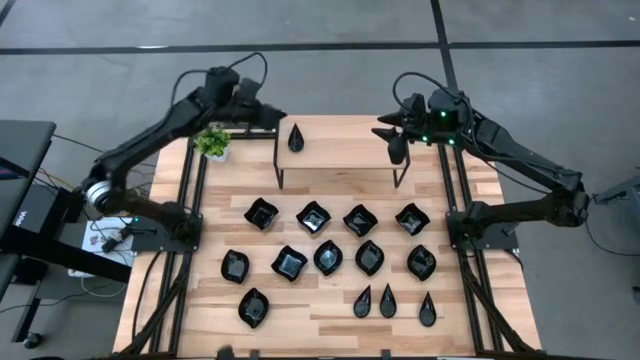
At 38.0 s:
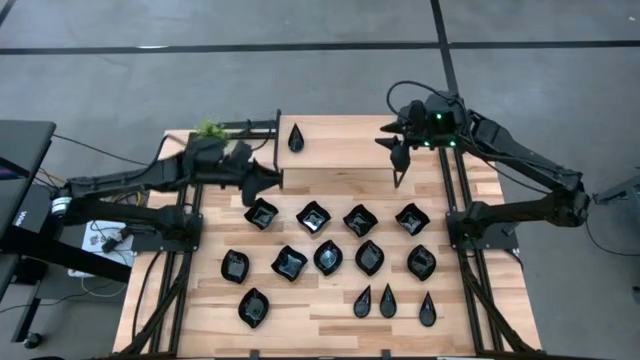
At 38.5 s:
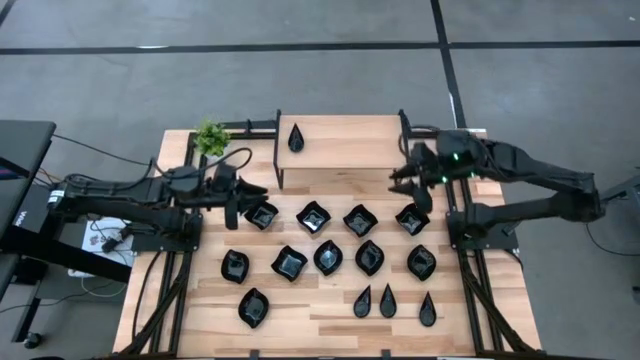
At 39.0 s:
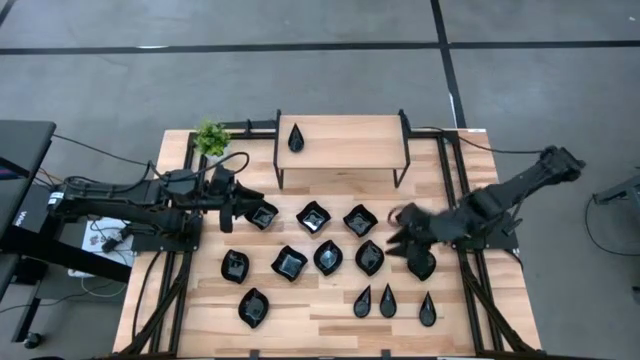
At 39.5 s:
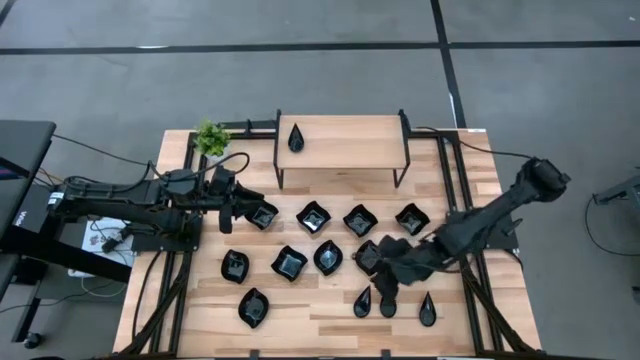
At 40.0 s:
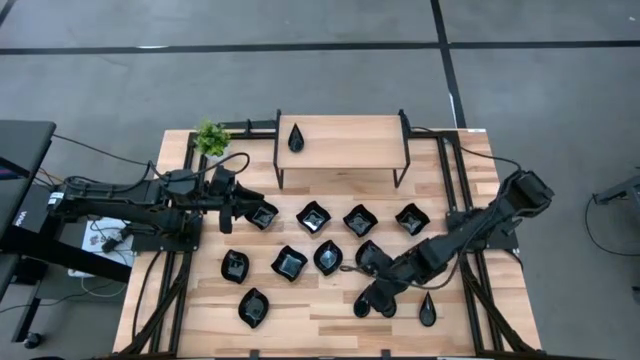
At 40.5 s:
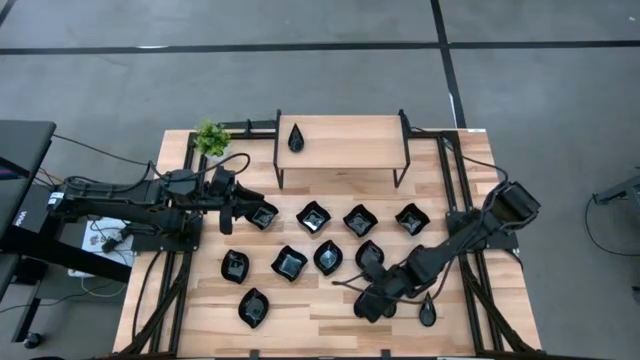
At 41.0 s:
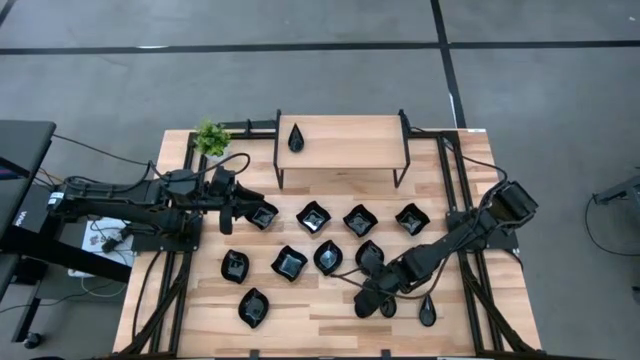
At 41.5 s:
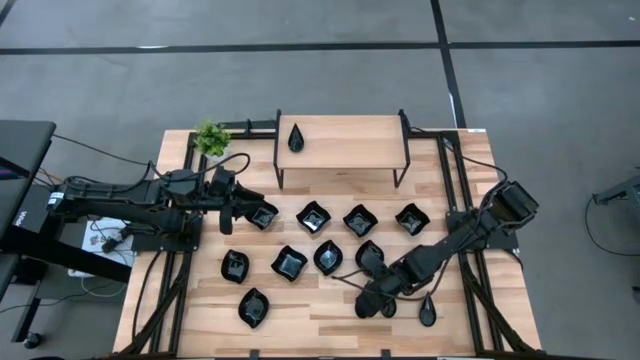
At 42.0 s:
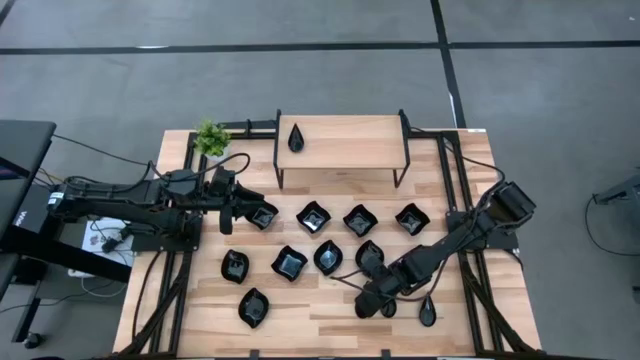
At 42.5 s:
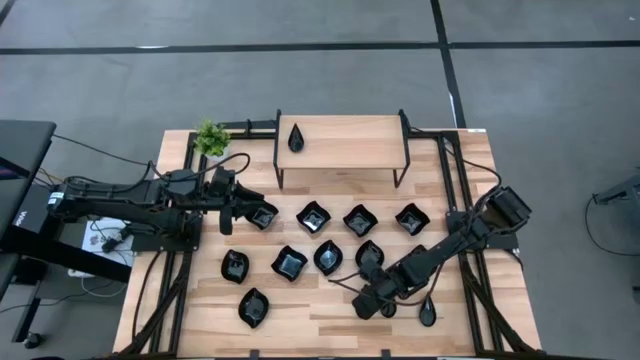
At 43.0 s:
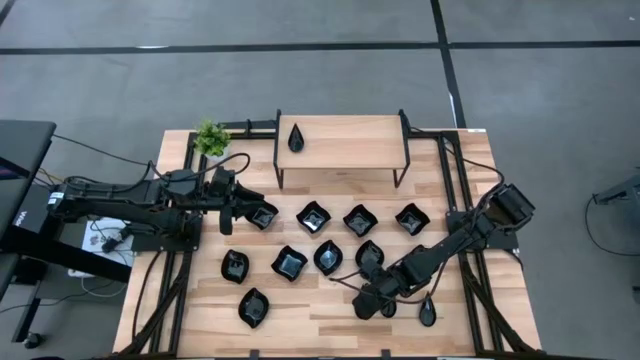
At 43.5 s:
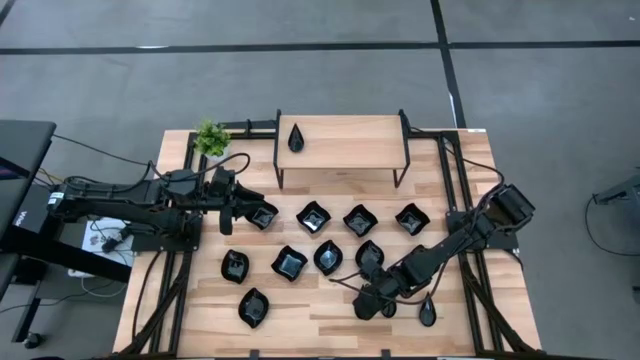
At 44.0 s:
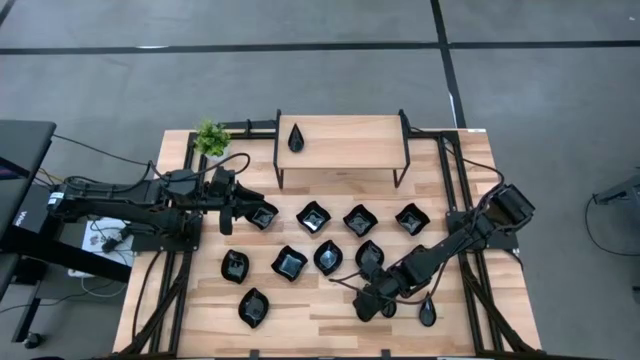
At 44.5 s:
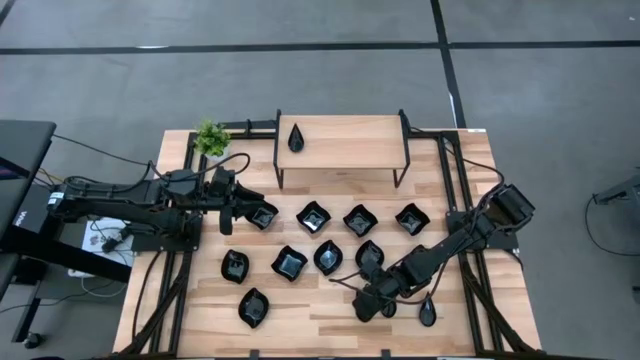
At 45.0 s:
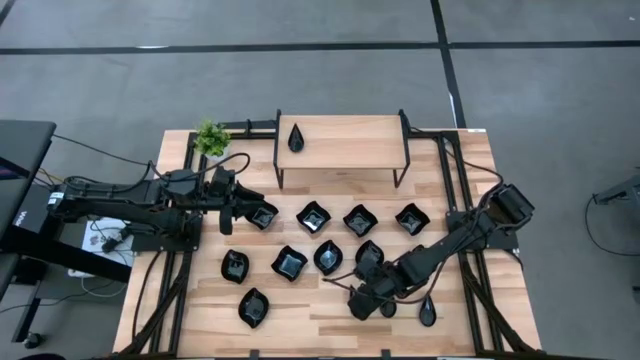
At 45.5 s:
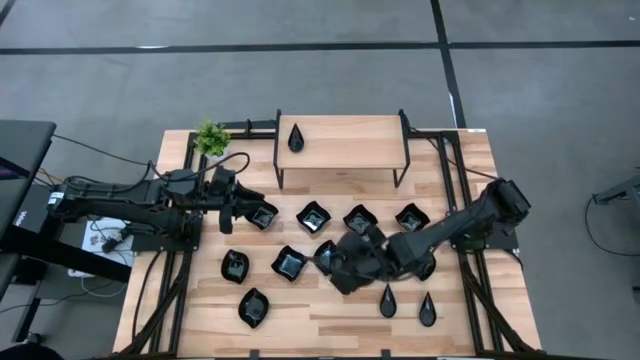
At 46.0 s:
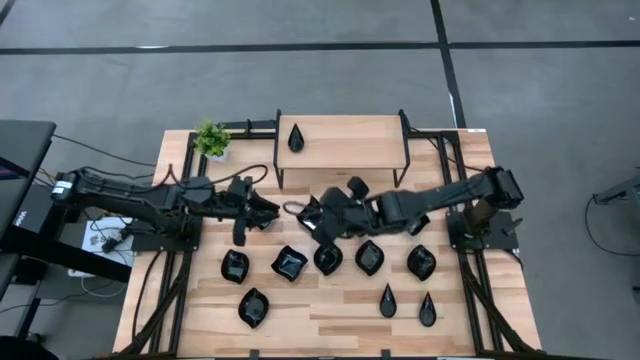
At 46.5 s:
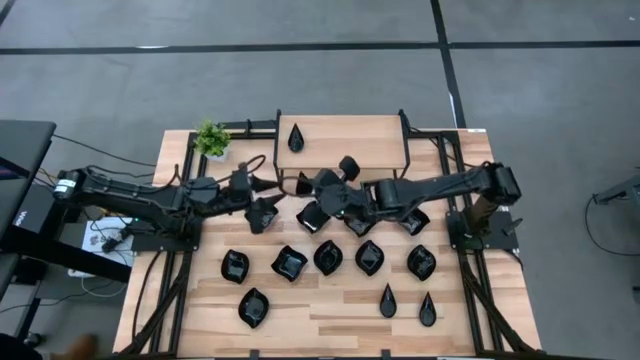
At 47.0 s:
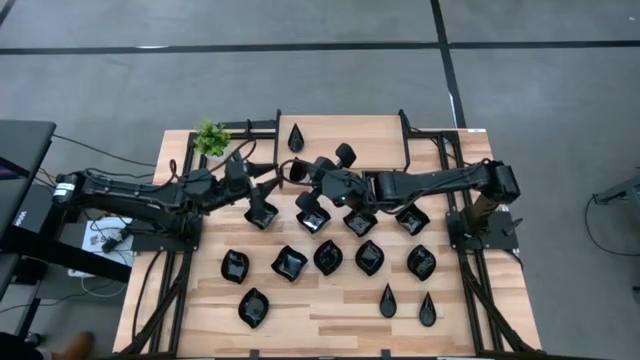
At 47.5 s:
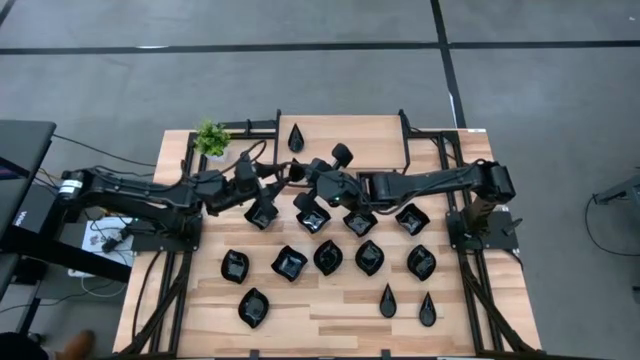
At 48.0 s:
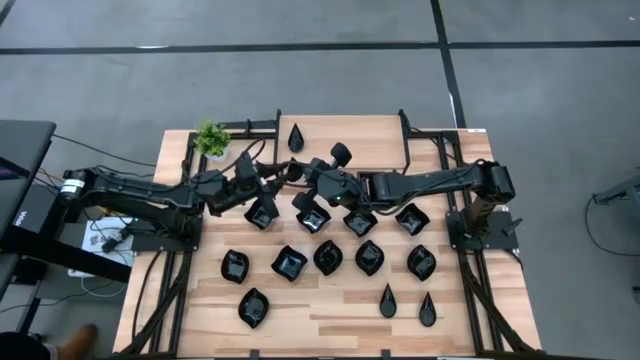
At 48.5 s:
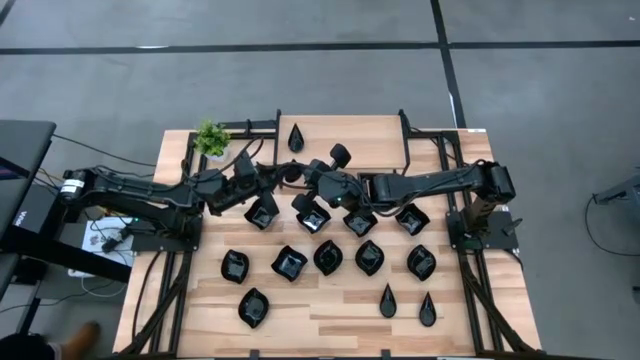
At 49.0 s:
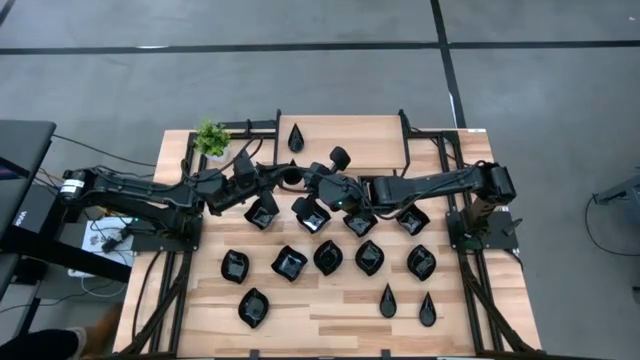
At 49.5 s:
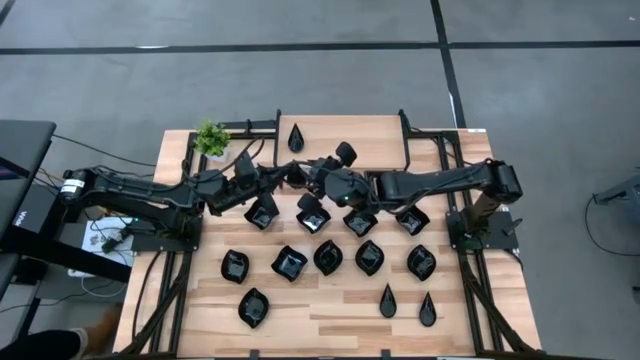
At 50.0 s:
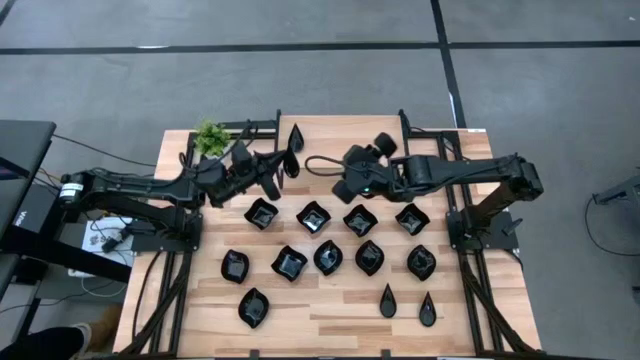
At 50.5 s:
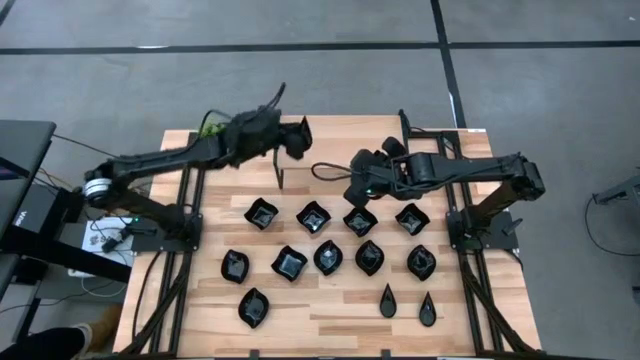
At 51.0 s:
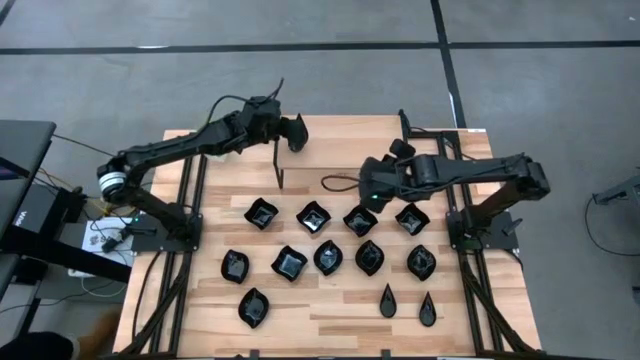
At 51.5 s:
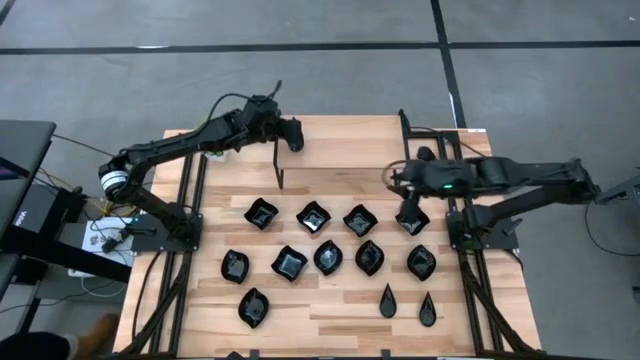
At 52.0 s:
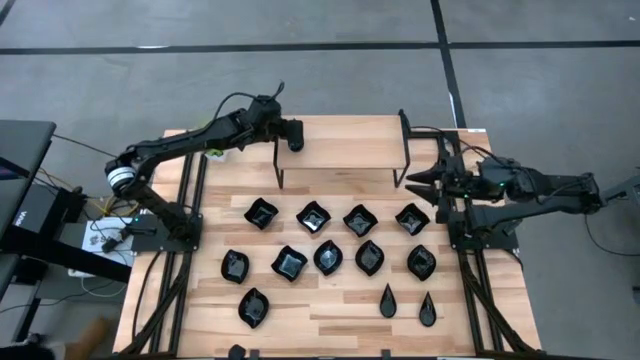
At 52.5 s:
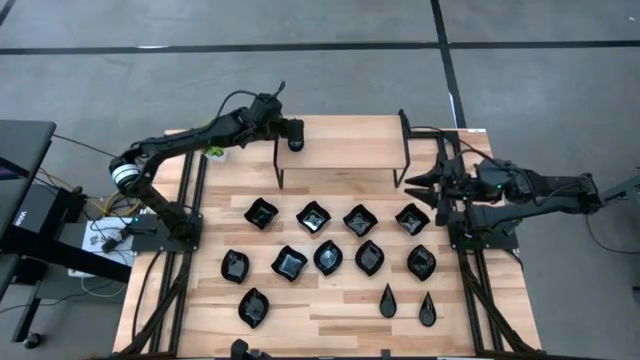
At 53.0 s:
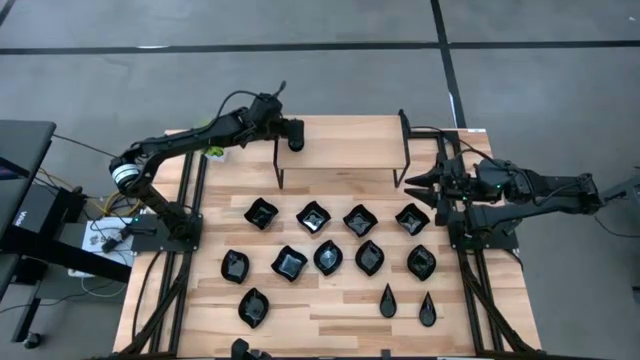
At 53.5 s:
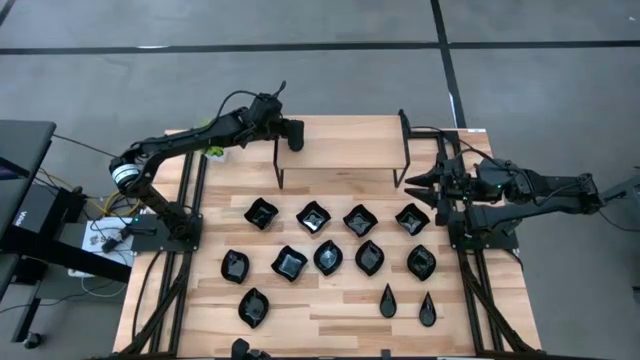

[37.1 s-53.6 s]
Task: Pick & Place Mini shaped plates
Stack the black drop shaped plate on top of the black drop shaped plates on the shelf

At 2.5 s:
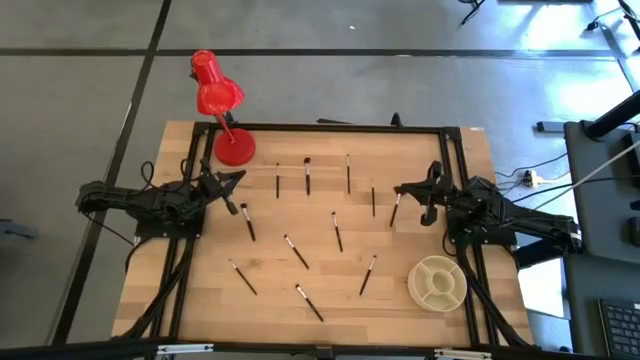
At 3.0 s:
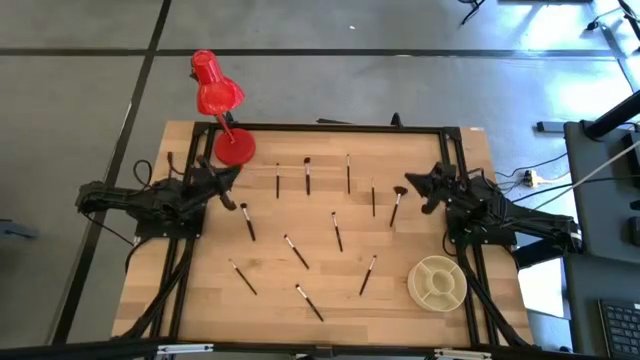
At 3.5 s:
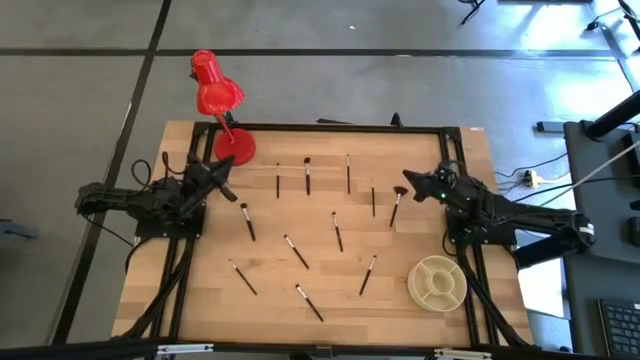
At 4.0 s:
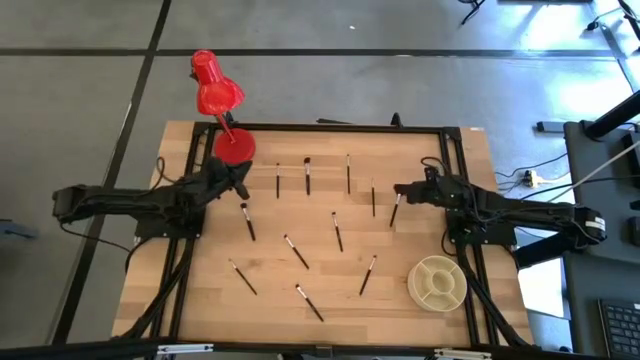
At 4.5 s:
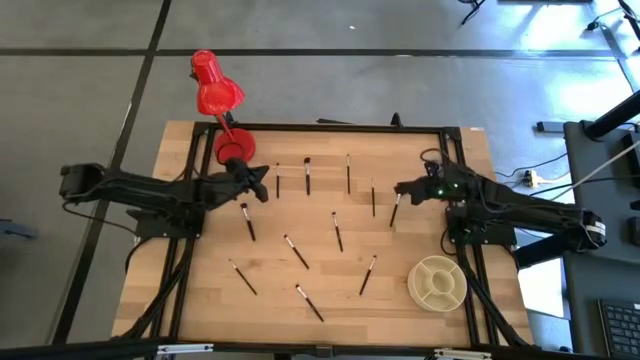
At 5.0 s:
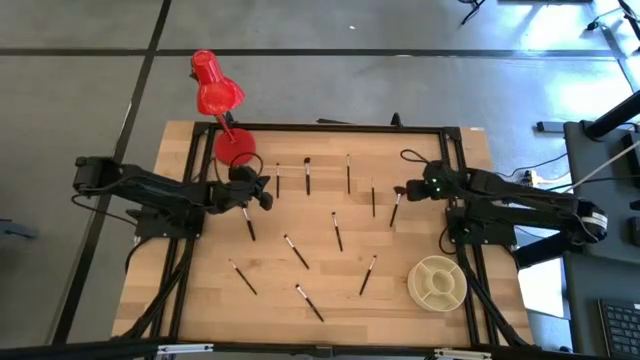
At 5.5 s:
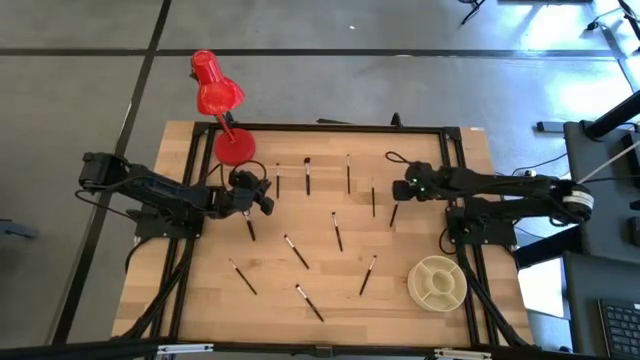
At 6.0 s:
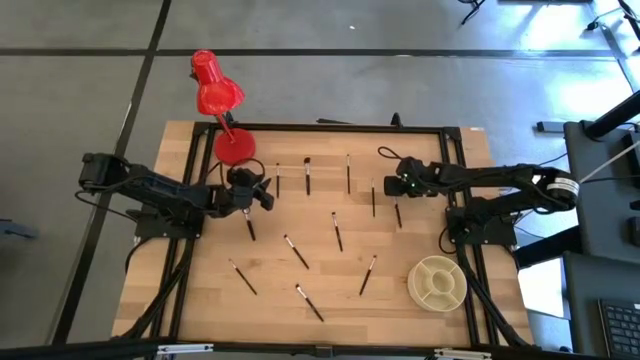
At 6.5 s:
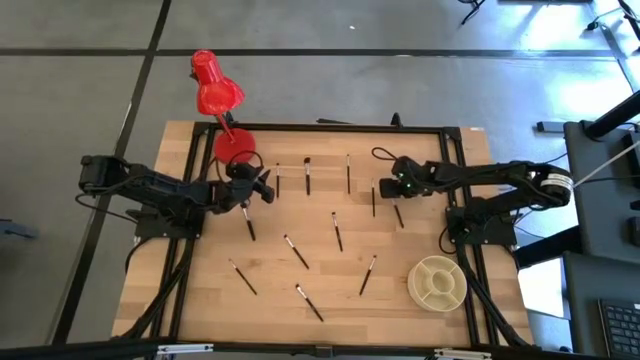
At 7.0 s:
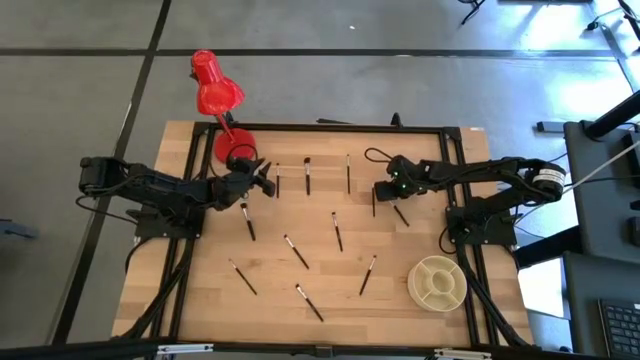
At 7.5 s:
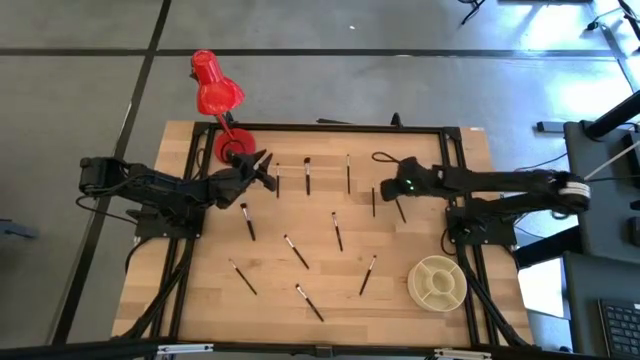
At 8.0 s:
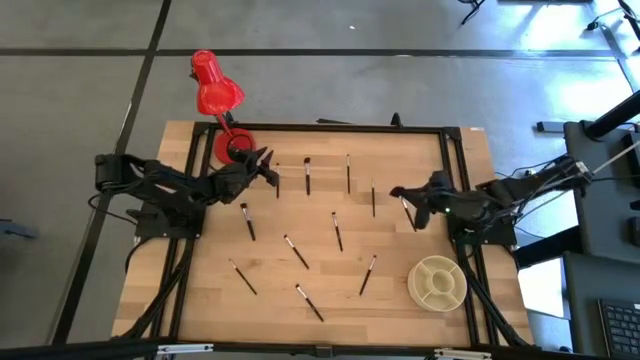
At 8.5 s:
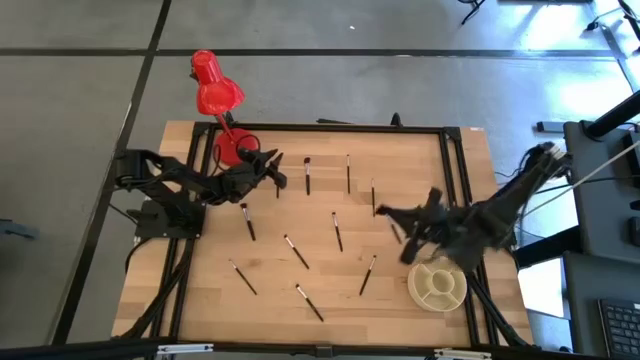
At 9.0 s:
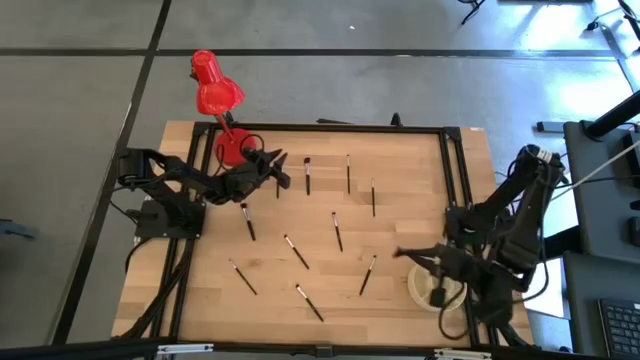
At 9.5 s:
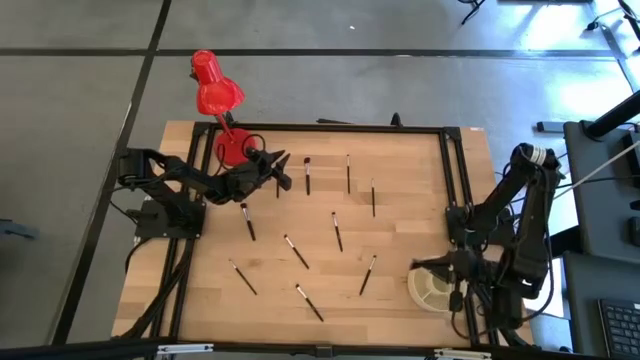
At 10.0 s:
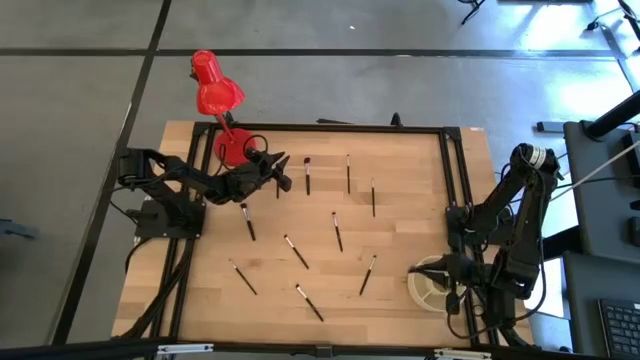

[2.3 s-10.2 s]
Task: Pick & Place Makeup Supplies
Put the makeup brush into the organizer
